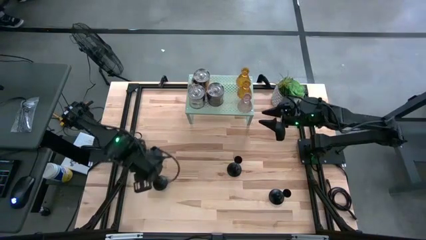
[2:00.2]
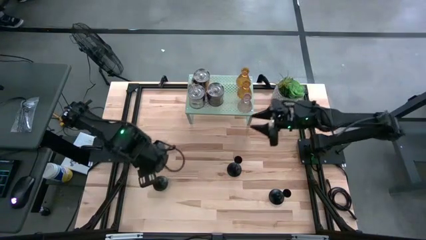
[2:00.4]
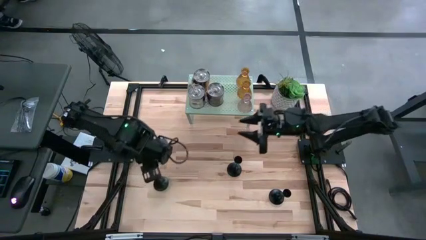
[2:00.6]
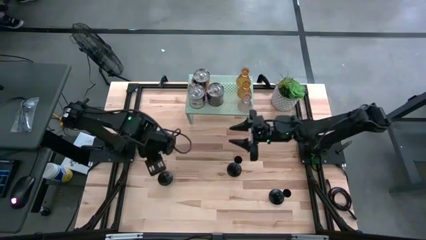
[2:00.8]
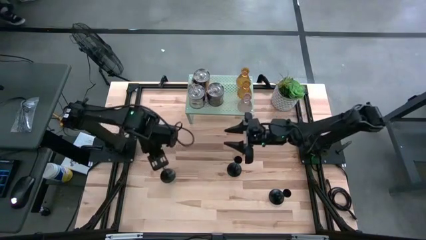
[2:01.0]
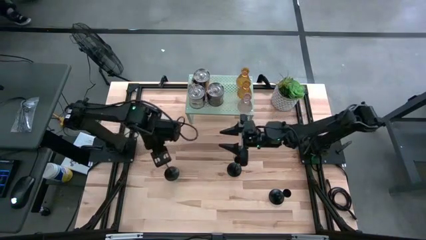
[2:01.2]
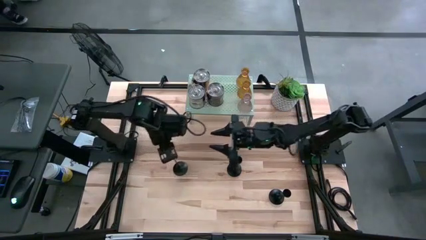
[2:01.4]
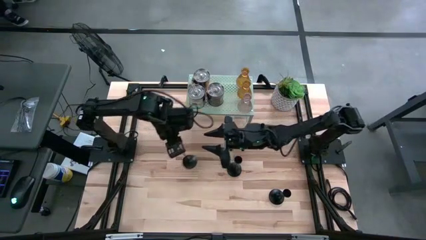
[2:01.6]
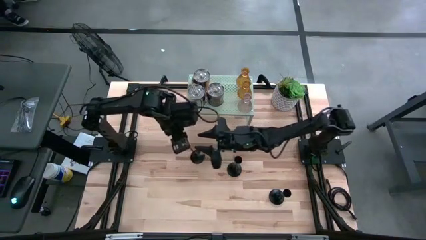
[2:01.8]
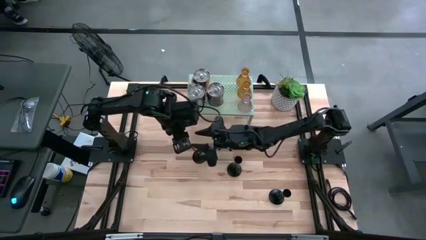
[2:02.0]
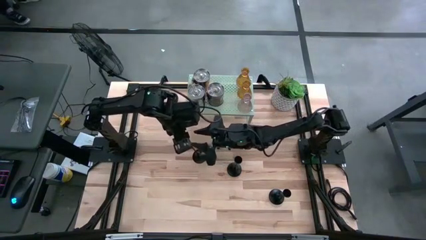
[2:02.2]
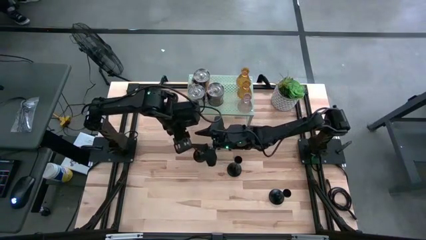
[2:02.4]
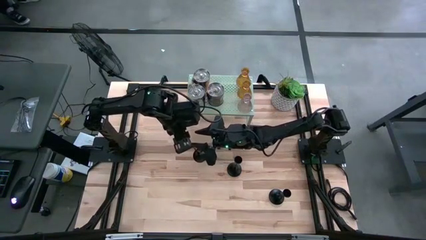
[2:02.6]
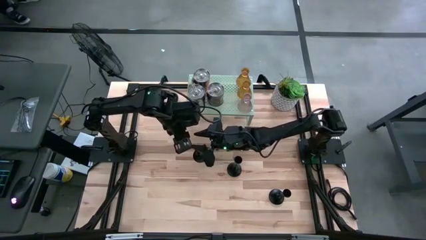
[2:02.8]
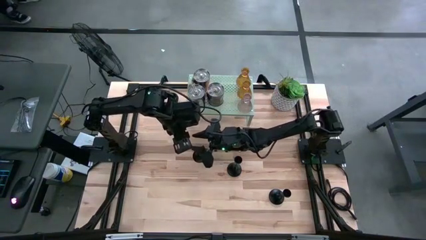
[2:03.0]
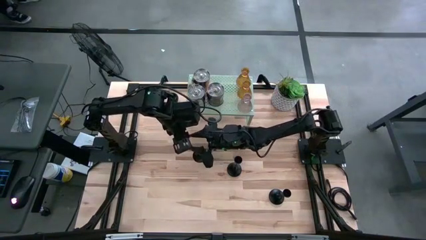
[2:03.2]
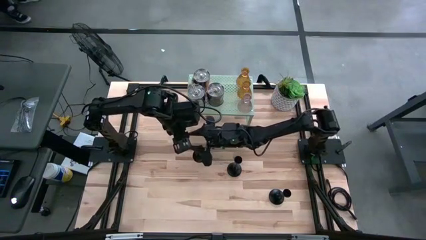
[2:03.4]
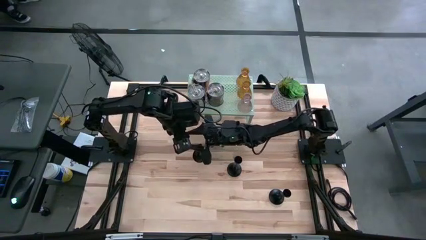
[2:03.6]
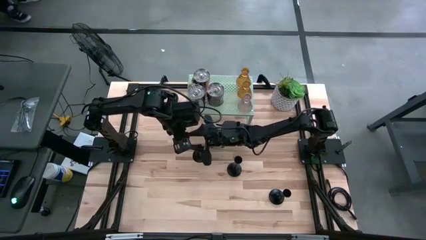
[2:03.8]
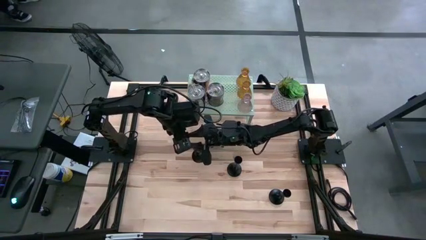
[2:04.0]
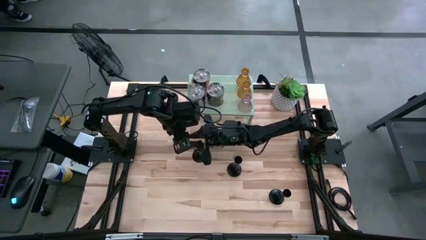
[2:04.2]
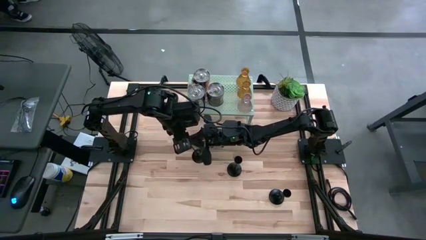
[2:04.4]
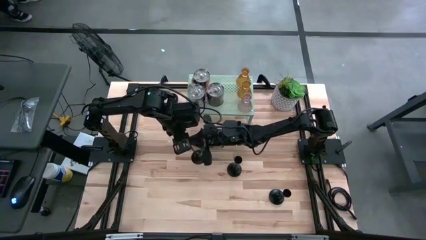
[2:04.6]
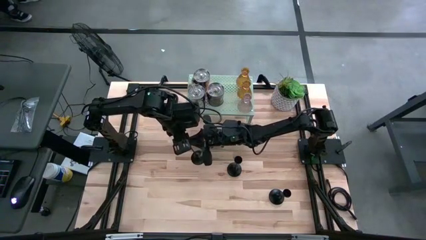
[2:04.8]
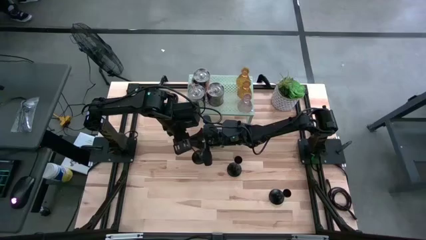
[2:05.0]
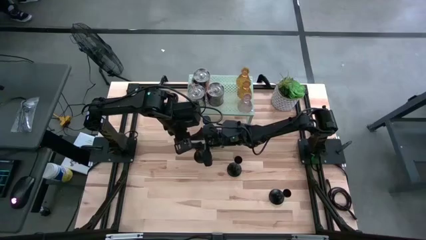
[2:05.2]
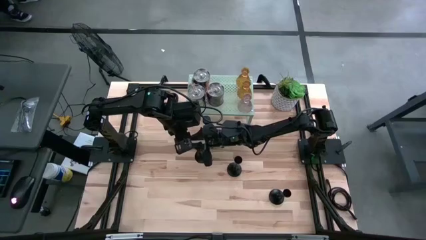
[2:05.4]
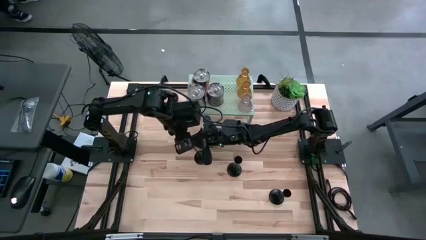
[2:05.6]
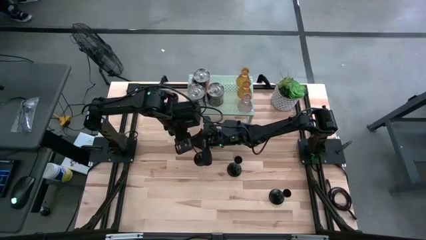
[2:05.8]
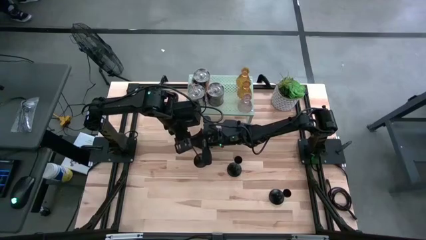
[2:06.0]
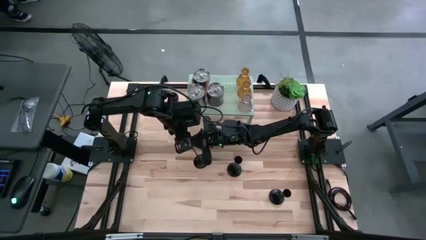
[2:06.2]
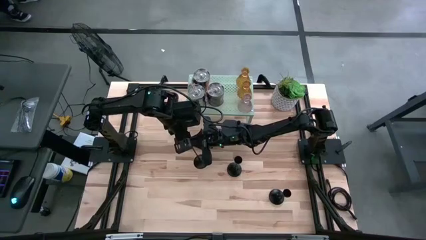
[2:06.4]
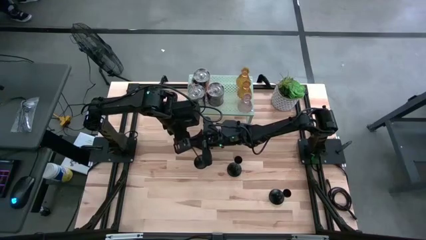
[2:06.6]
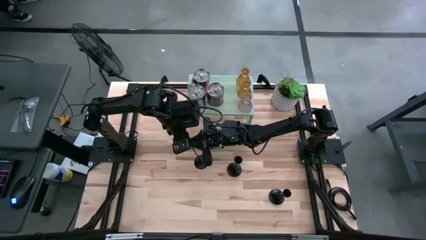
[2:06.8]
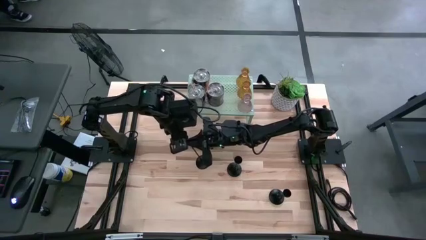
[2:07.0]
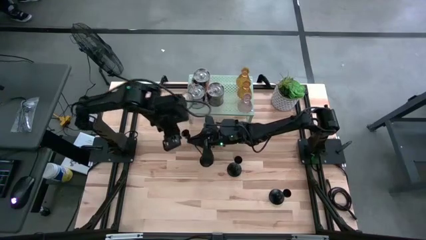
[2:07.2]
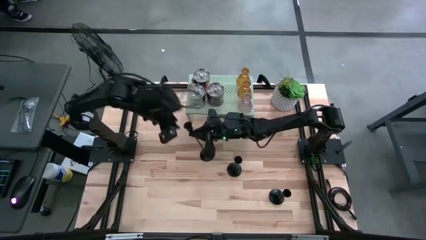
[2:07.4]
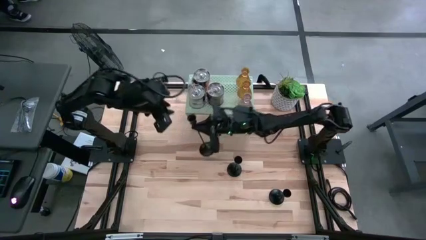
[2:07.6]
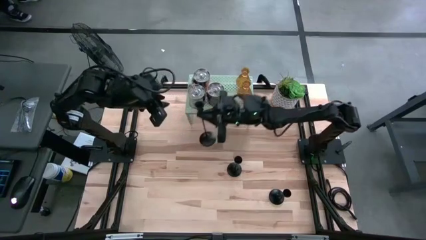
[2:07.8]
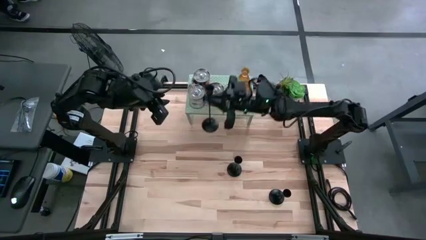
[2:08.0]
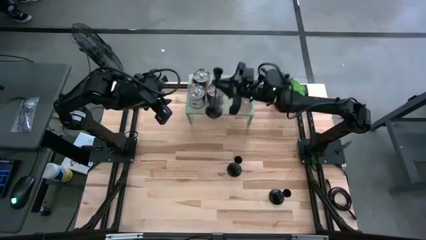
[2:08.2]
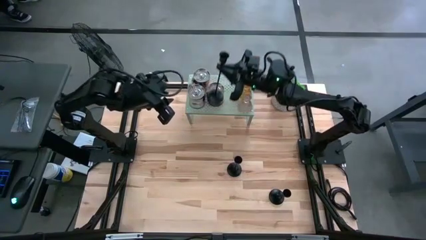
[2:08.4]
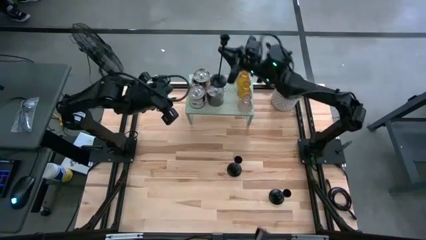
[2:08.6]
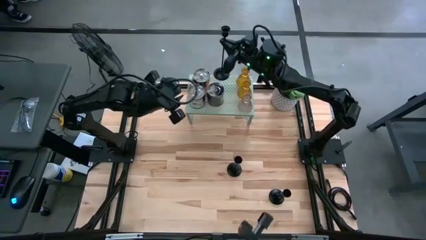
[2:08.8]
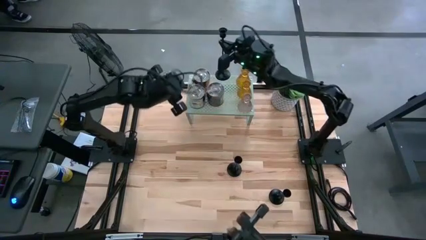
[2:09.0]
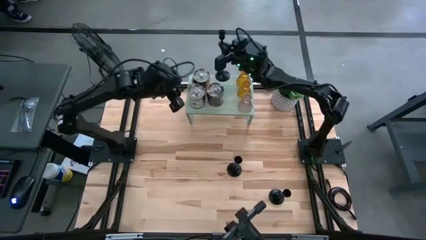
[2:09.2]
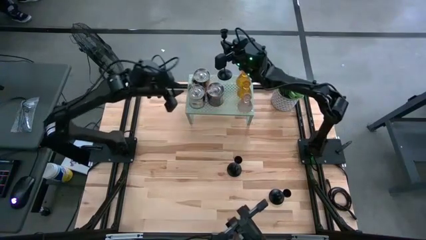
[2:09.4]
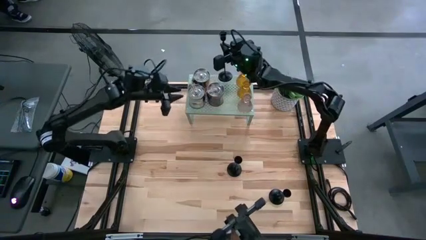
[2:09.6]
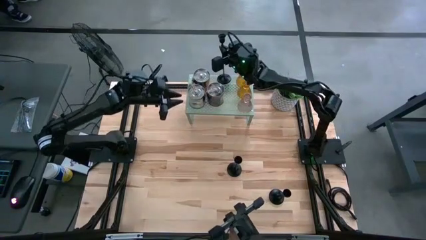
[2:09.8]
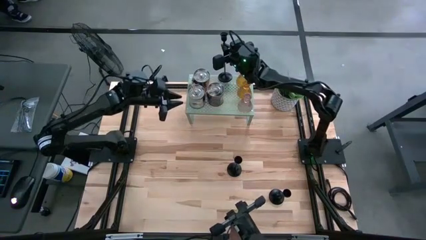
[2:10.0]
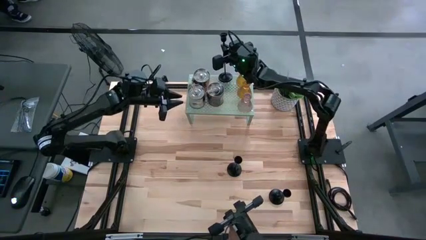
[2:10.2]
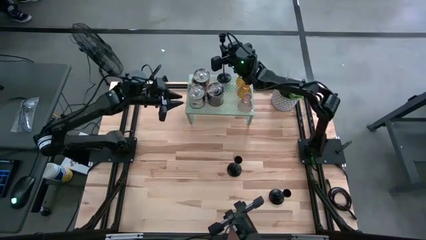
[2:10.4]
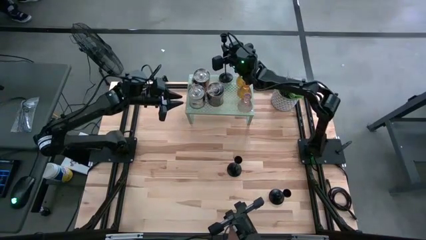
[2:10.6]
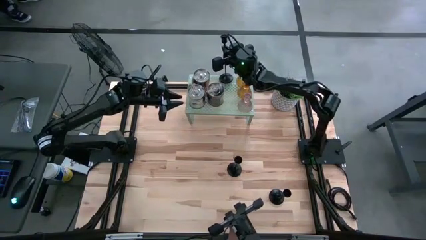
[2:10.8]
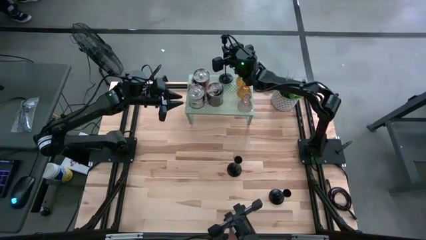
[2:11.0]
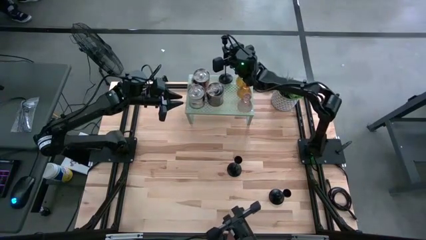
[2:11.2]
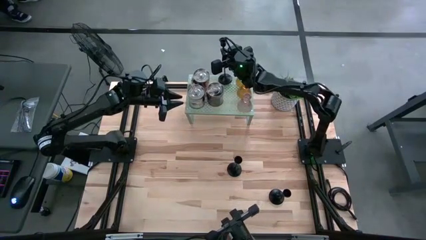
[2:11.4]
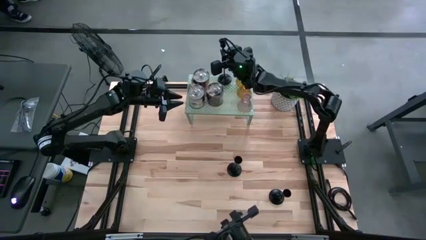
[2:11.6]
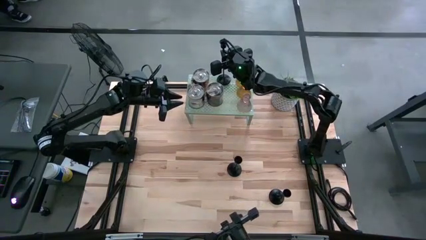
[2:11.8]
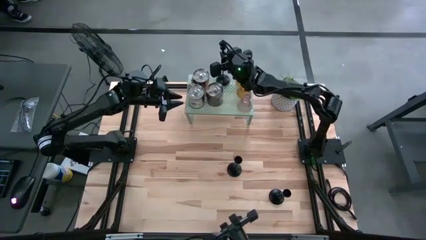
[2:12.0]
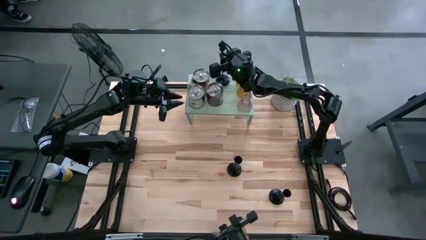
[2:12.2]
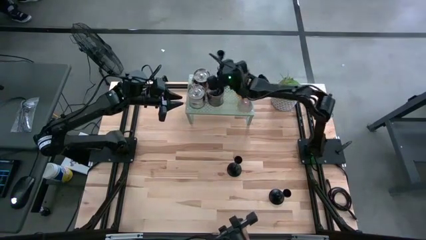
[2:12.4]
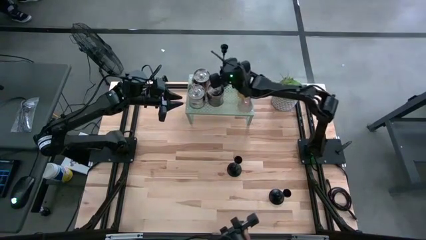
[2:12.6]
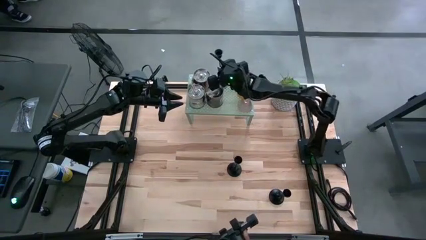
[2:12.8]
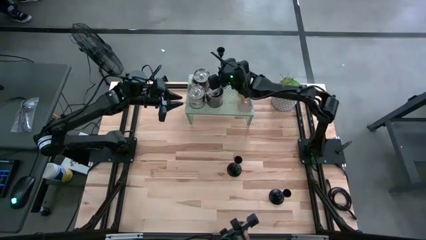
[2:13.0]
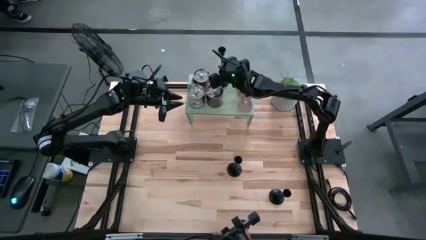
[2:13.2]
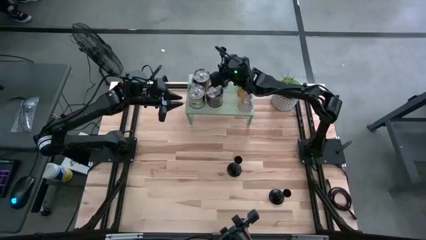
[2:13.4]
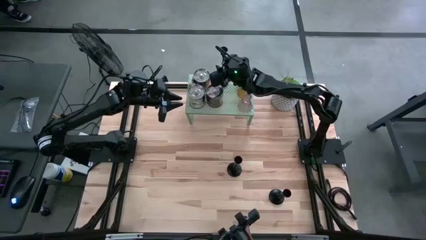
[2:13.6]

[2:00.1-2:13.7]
Task: Pick & Place candle stick holders
Put the left black candle holder on the shelf

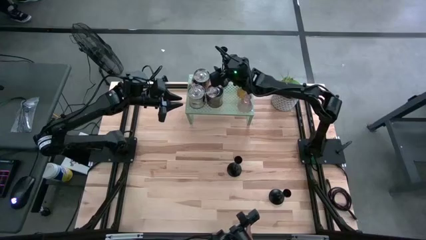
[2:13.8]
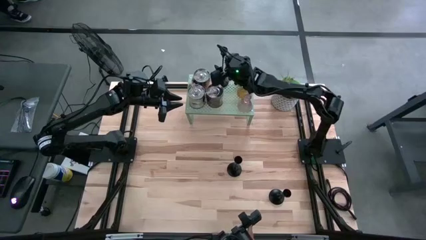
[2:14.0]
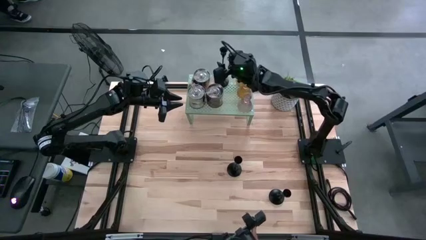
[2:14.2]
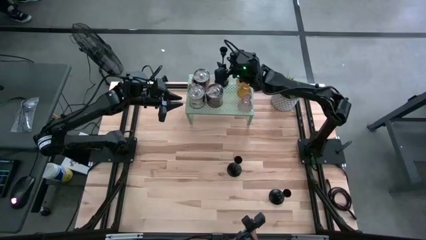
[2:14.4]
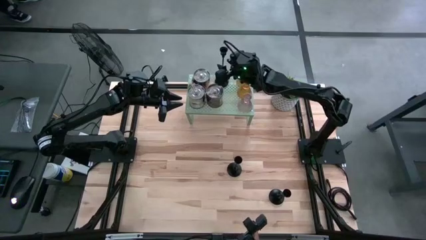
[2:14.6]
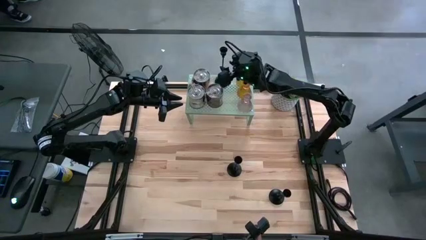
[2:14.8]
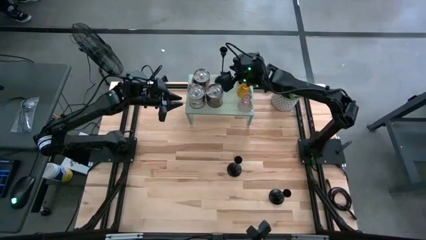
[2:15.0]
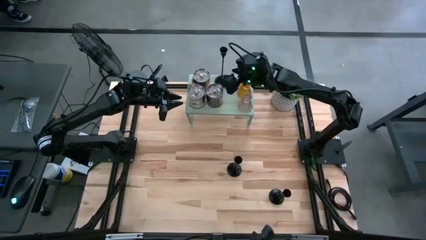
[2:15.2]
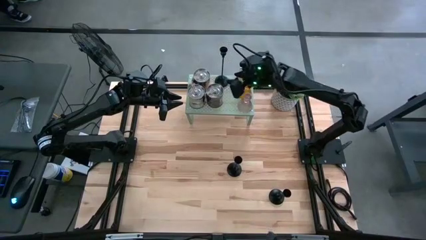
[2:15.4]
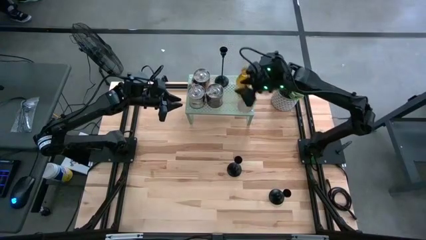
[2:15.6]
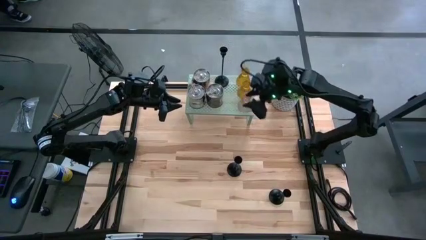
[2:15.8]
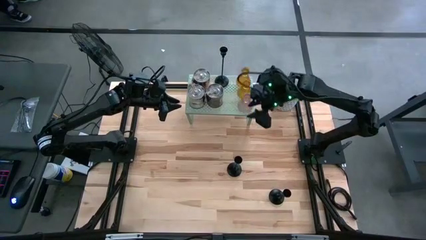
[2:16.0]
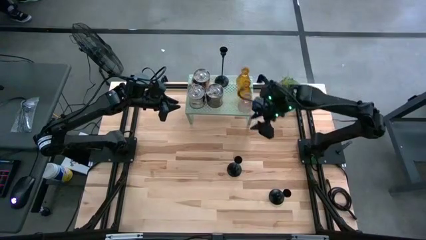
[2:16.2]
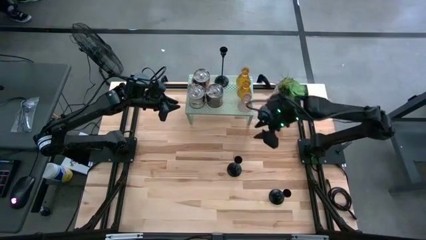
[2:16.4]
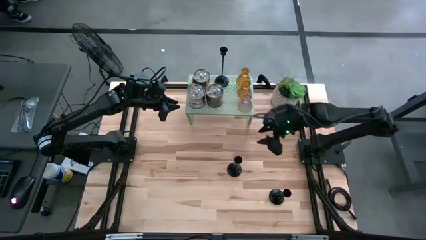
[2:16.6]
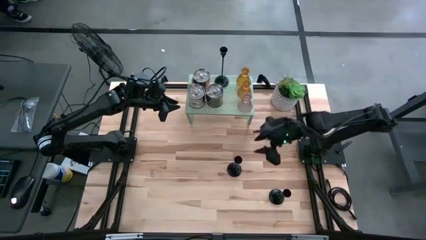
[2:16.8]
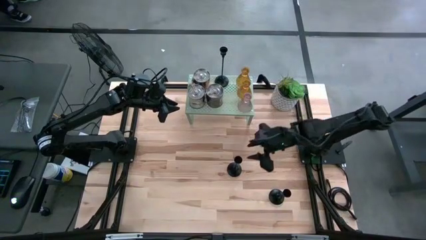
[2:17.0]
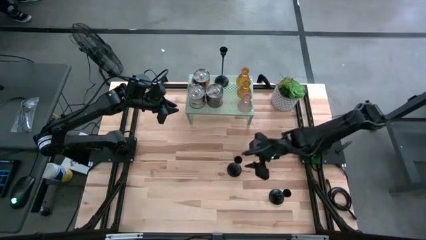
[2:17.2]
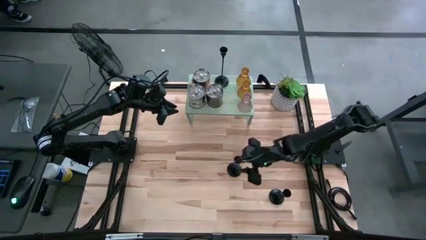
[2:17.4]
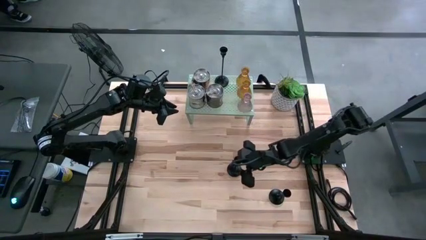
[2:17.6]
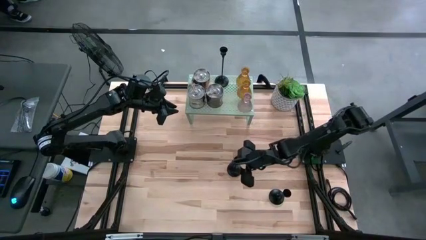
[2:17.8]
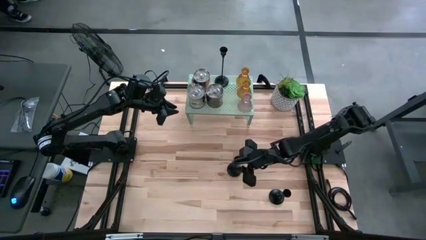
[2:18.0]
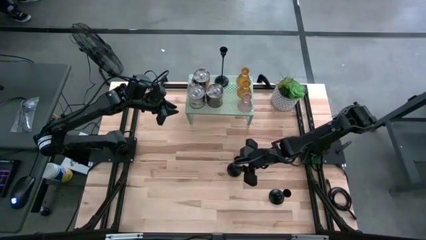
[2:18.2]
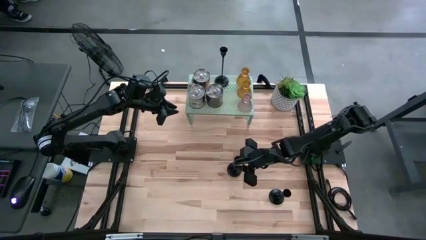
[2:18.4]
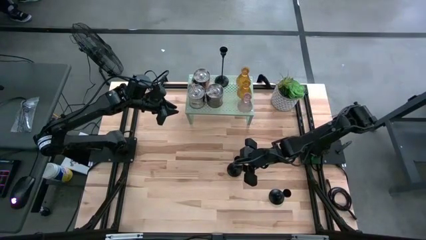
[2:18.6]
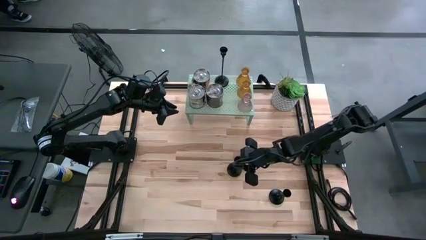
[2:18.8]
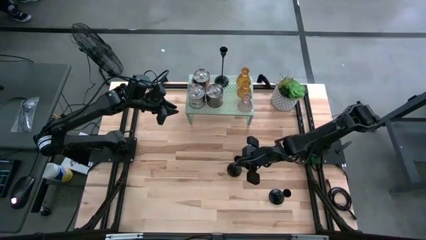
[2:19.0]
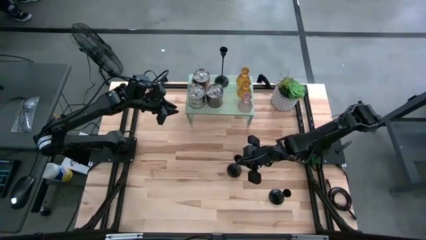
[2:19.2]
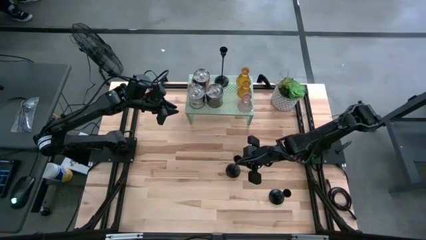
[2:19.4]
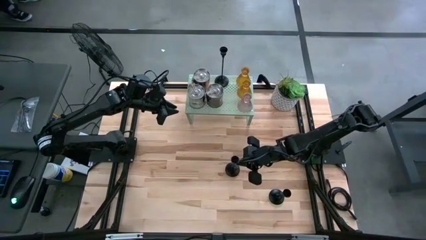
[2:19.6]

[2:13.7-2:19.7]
Put the top black candle holder on the shelf
